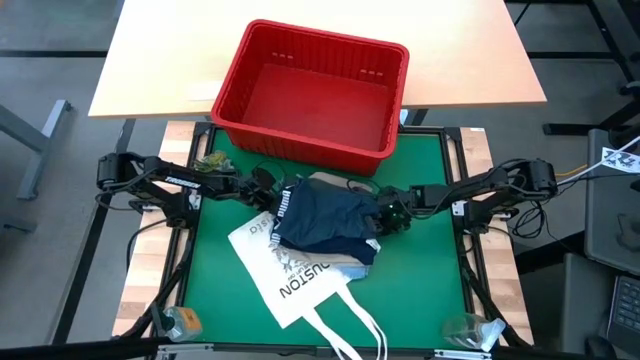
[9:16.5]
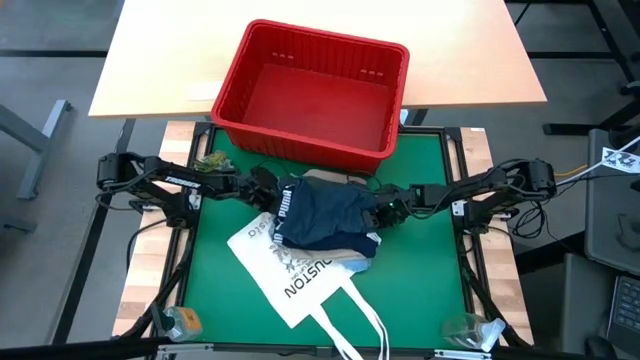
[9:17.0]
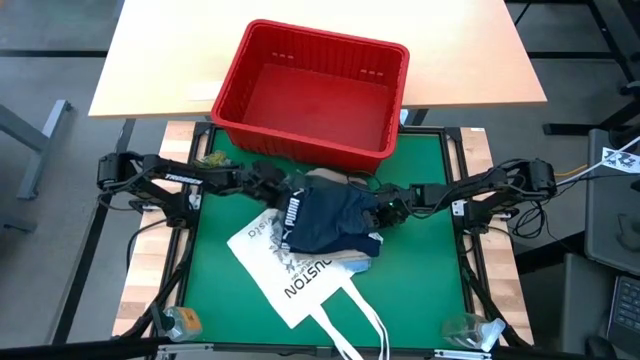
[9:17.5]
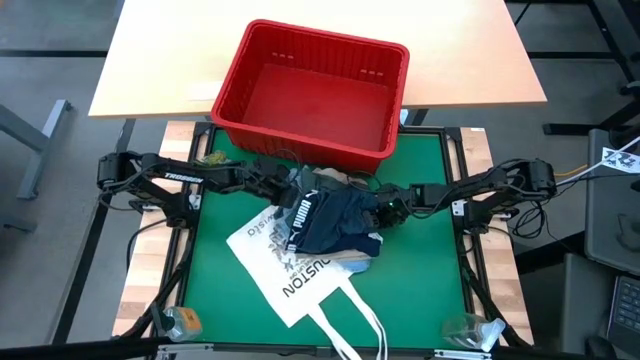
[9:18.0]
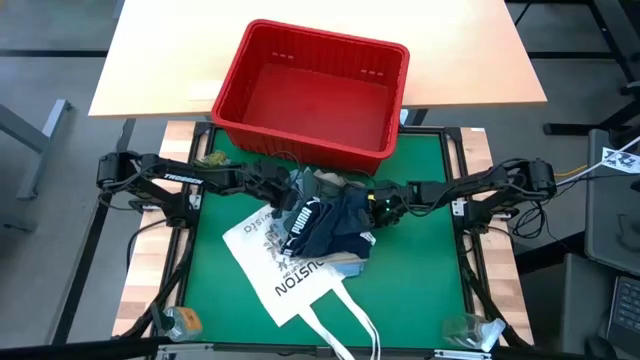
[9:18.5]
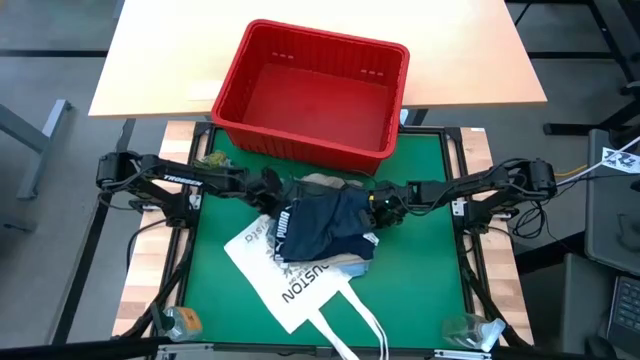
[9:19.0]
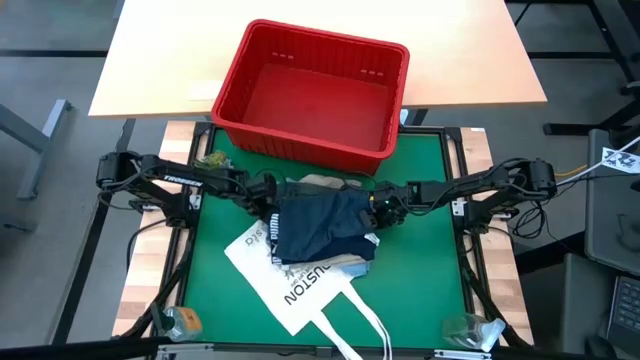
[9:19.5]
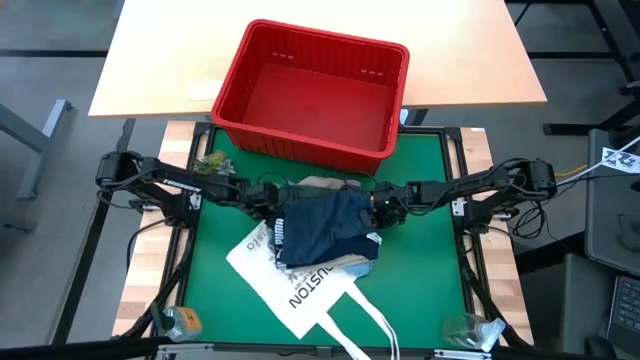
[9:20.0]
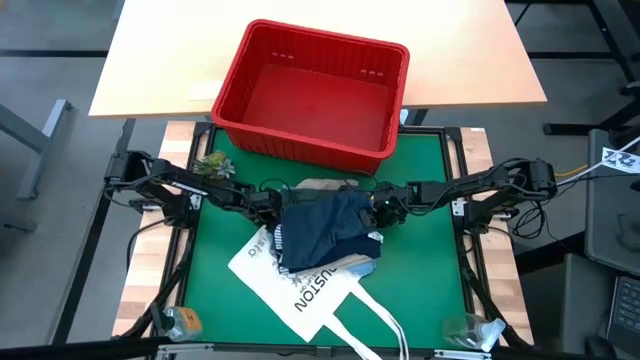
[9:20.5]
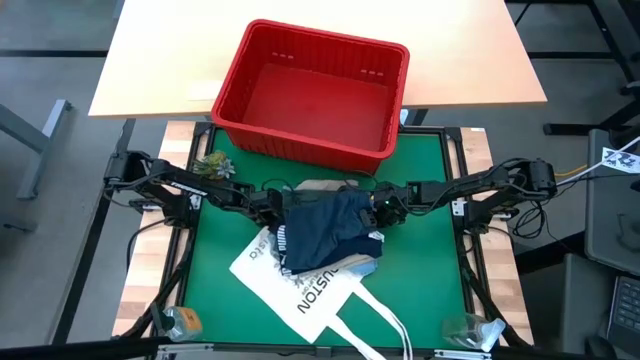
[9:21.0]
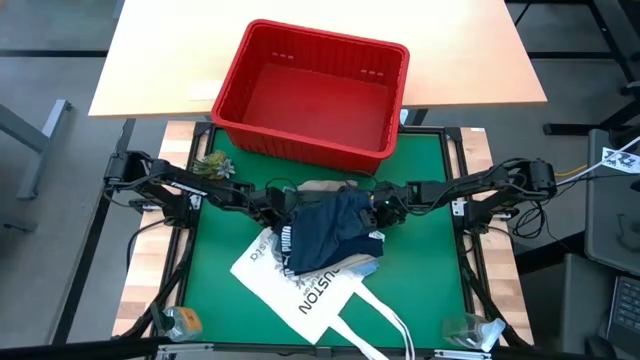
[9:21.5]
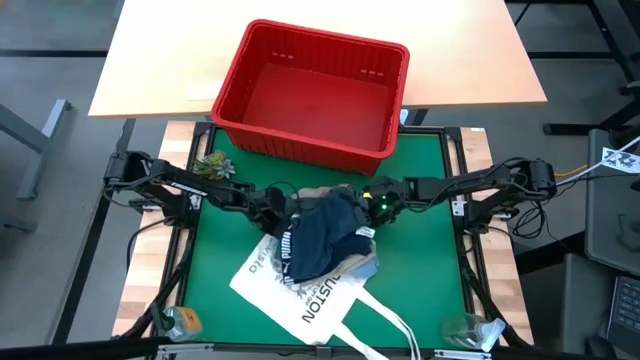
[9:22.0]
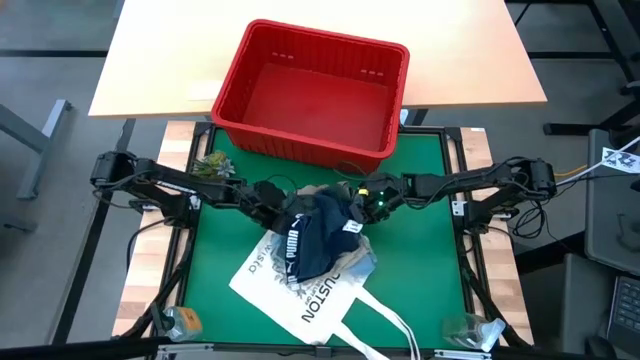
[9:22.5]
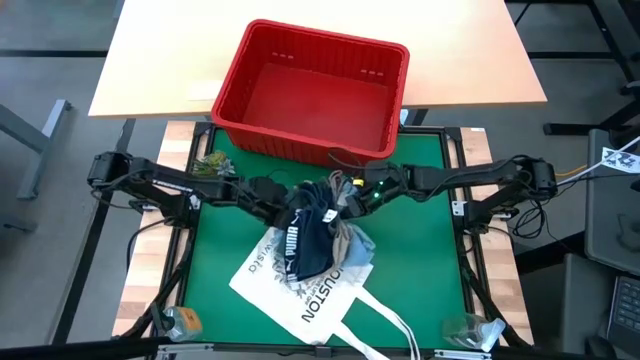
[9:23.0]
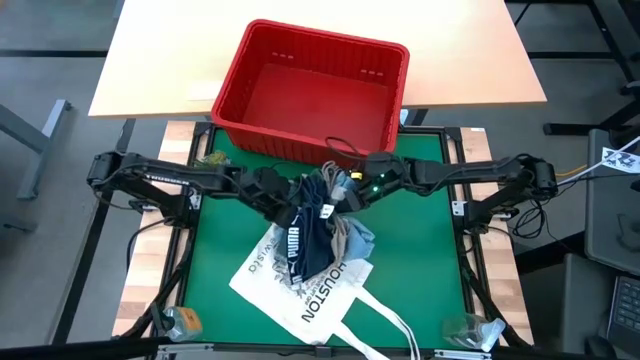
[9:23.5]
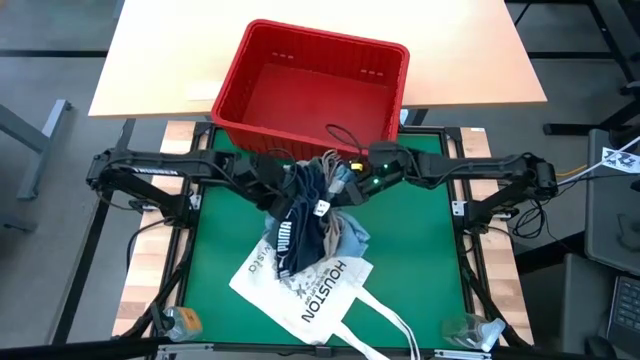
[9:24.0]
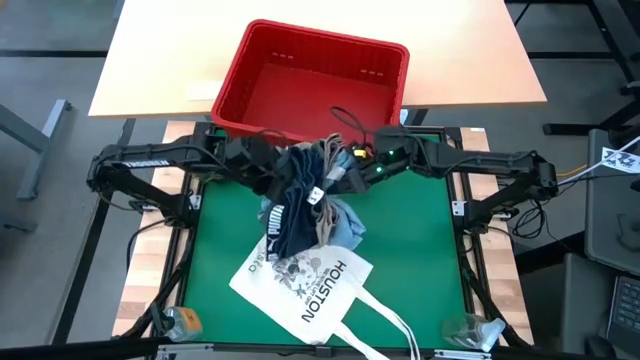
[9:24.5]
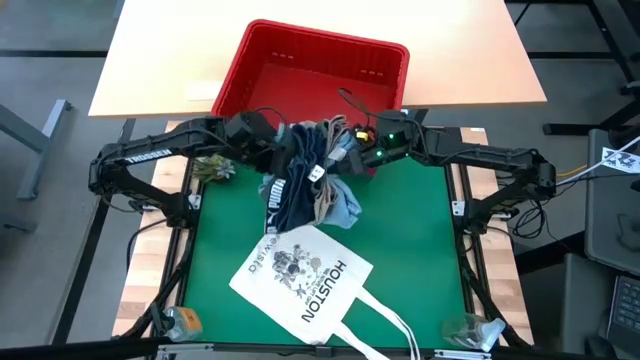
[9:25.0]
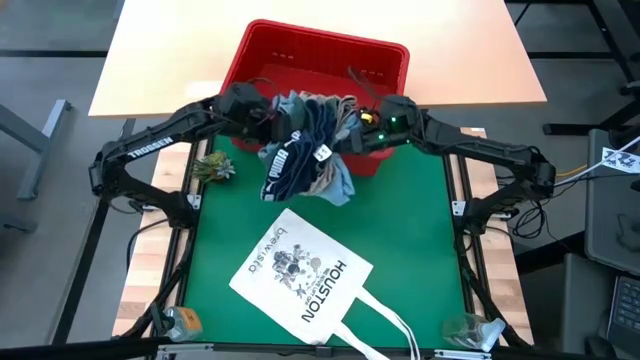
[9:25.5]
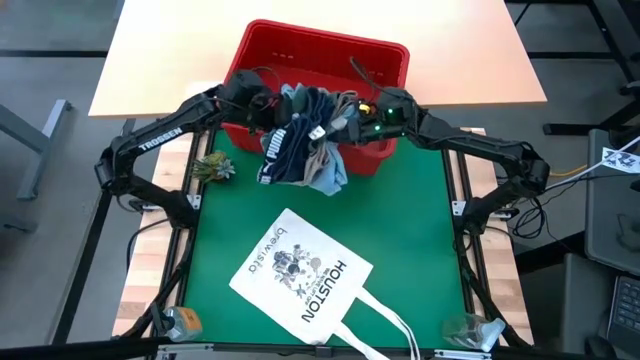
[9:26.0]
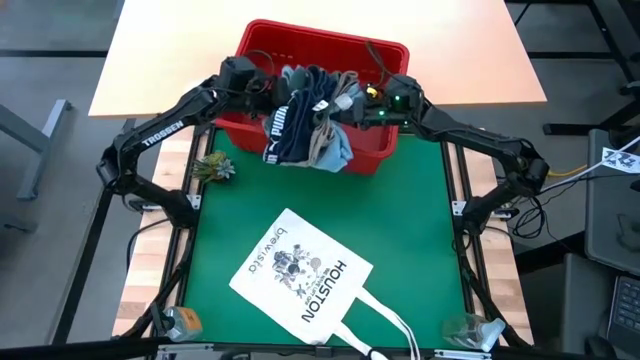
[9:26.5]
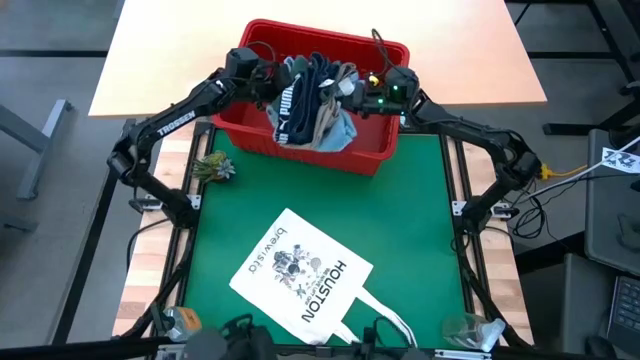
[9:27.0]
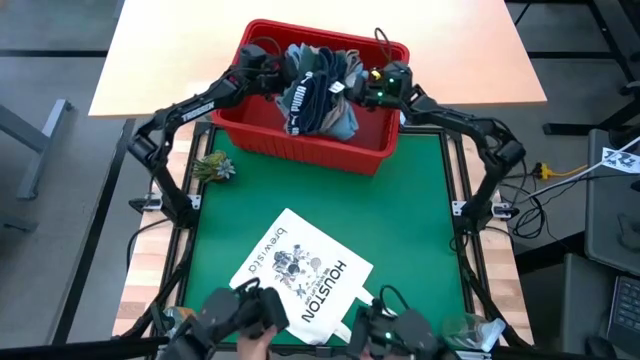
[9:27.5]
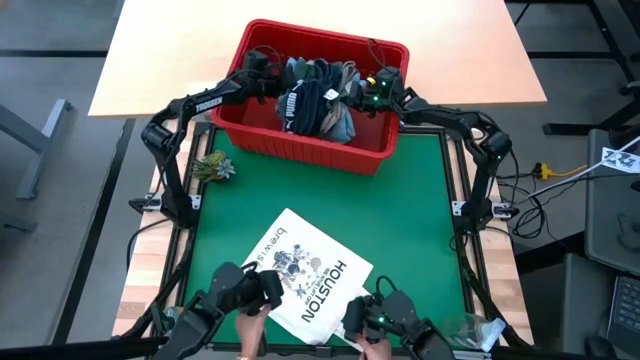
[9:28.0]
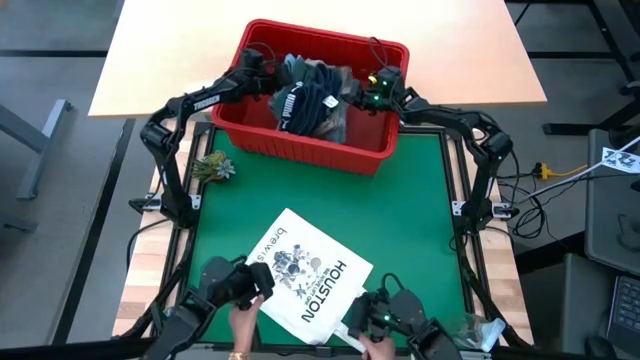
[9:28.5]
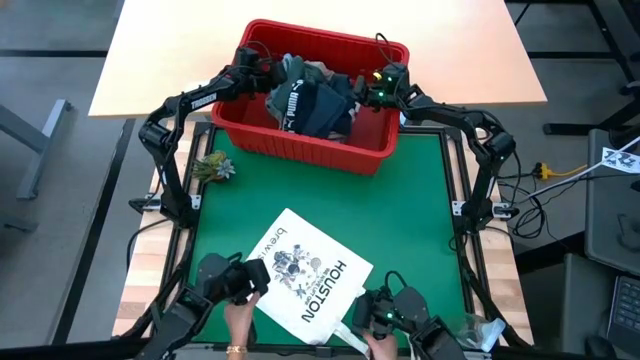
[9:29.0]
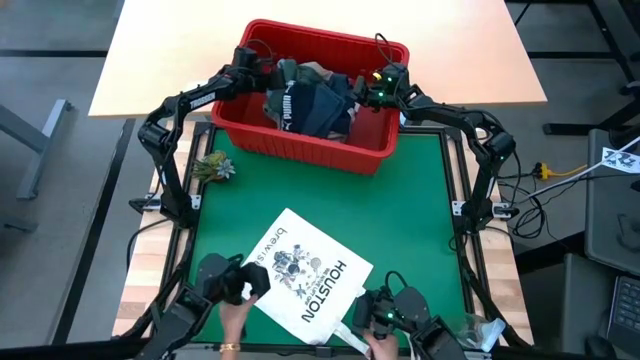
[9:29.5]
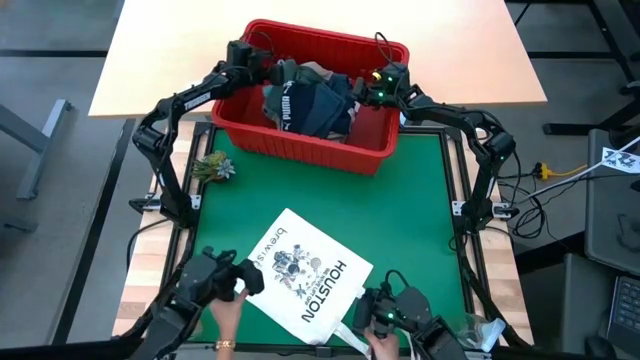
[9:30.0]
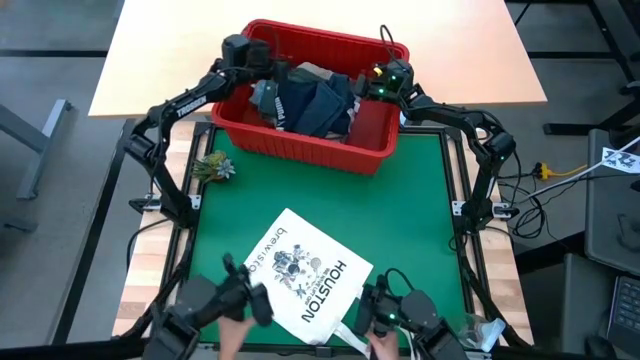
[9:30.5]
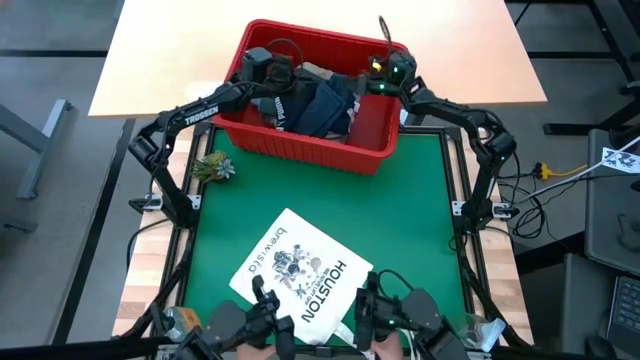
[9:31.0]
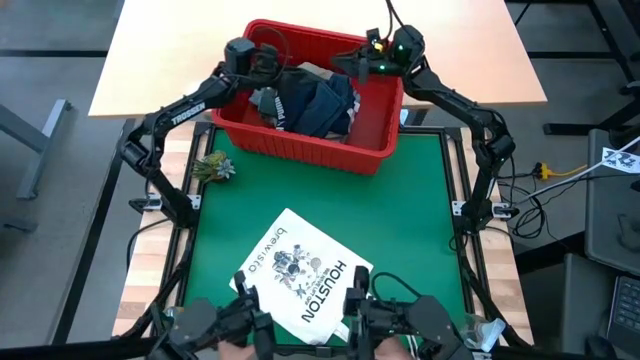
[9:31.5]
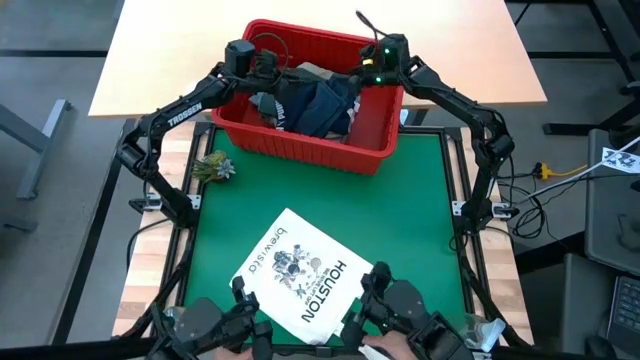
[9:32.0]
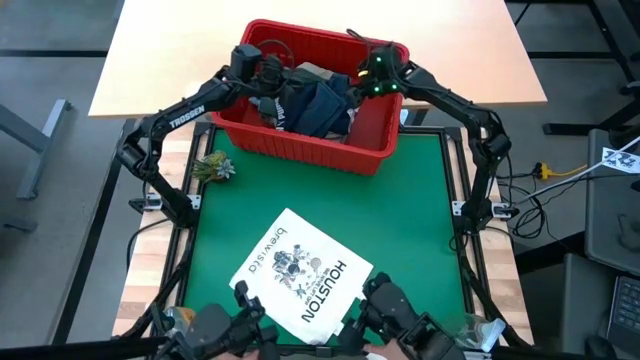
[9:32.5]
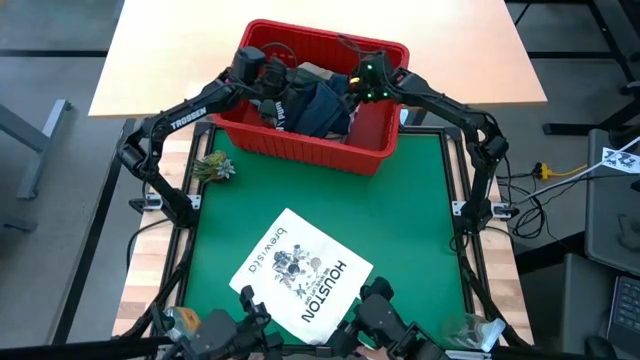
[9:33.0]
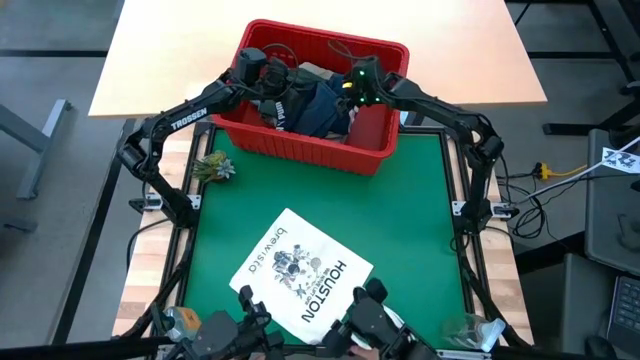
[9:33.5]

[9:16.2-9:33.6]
Task: Fold Laundry from Bin
Put the stacked clothes into the red organizer bin
